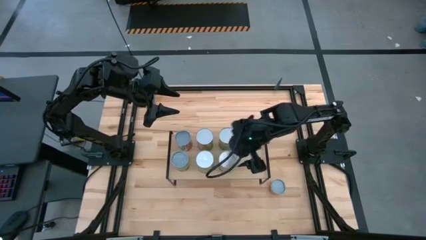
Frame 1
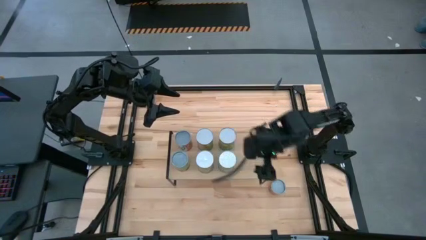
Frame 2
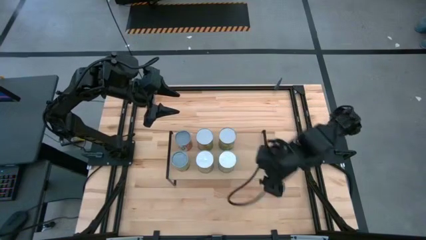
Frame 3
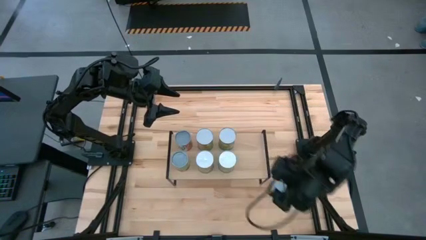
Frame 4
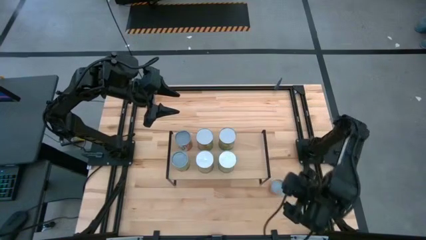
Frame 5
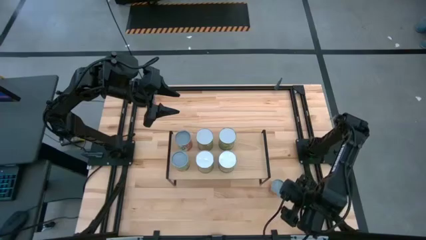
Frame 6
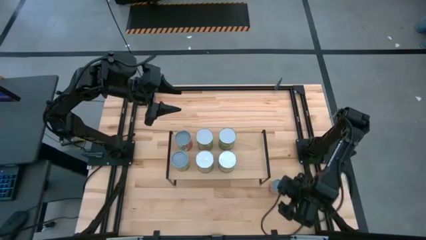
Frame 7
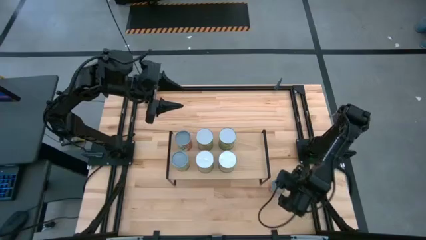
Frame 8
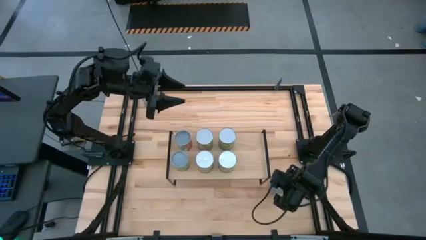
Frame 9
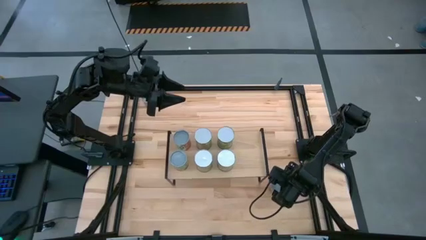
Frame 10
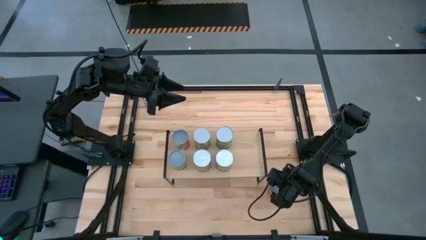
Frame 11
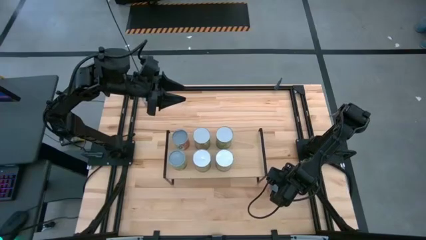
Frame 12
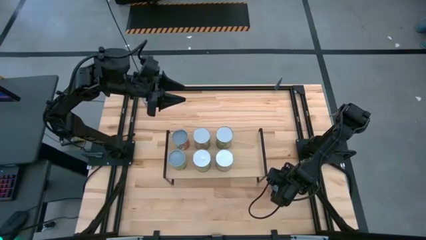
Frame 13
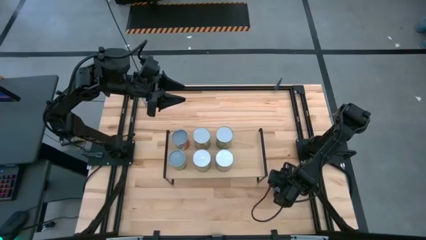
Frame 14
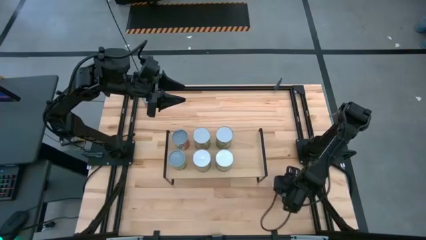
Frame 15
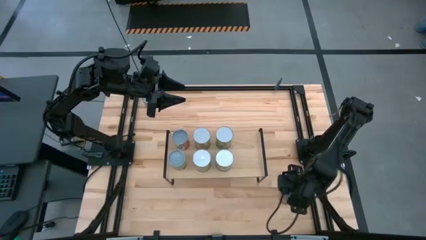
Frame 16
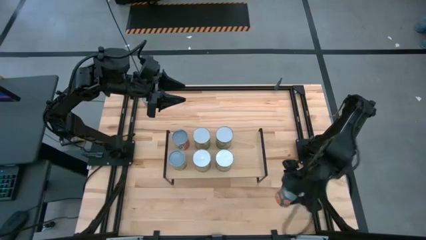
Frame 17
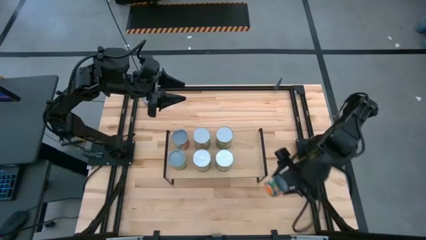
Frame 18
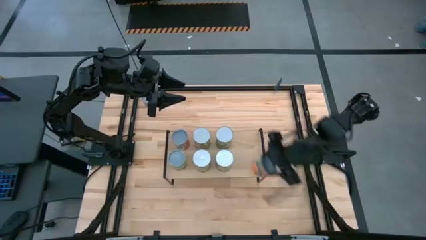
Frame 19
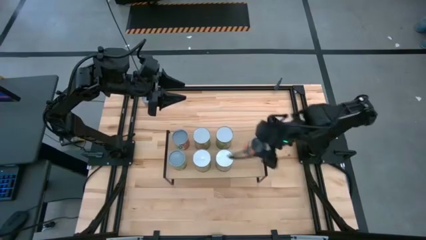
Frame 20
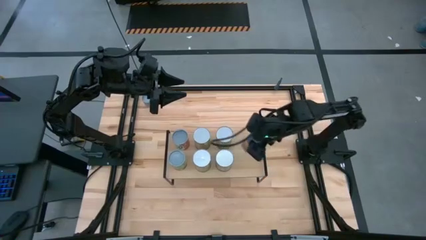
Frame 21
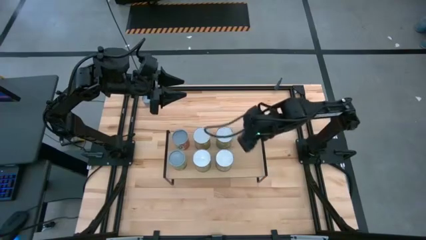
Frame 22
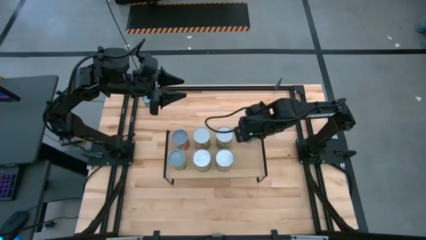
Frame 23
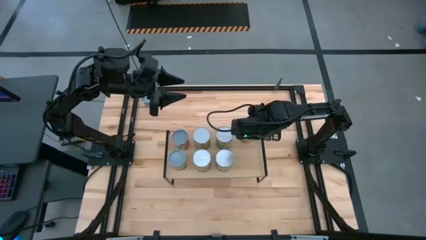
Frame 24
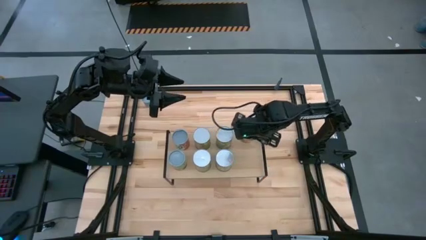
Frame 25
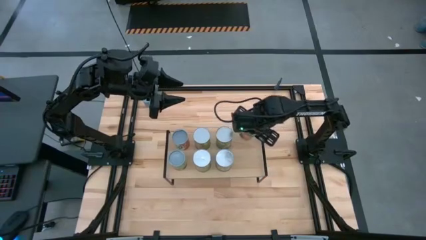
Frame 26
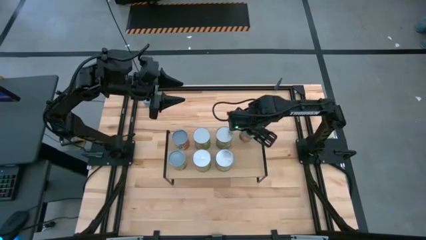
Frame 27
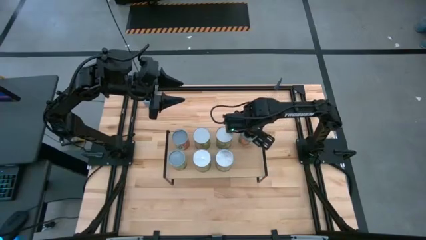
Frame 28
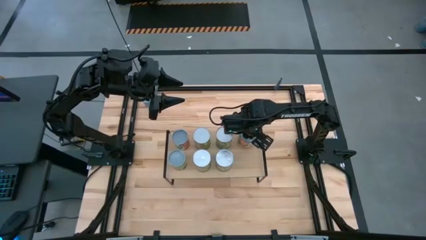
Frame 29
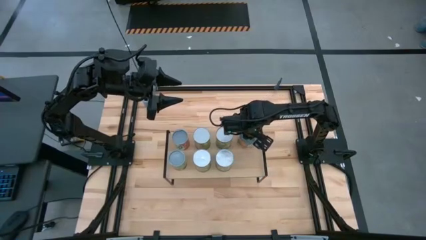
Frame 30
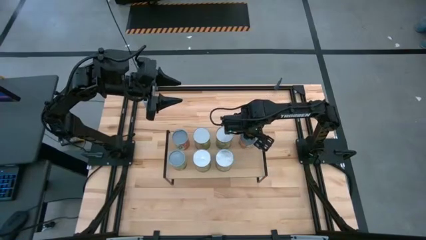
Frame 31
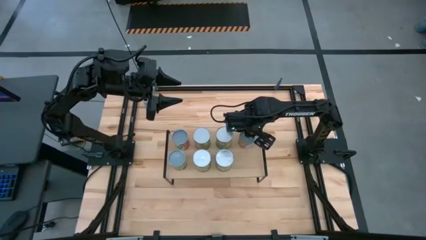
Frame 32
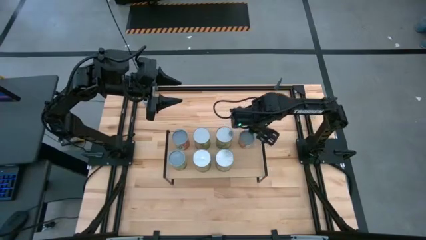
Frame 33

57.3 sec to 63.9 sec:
Task: Pick and place cans onto a shelf
Put the small canned oranges on the shelf

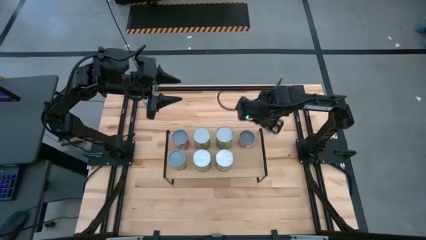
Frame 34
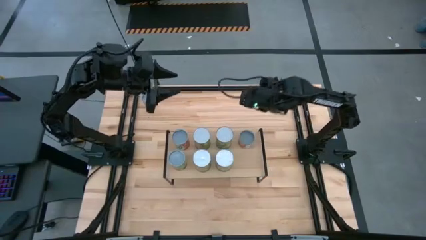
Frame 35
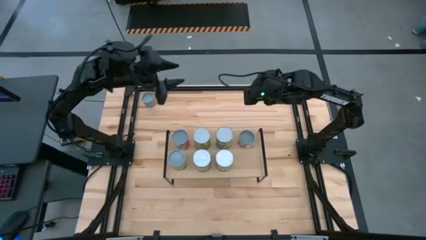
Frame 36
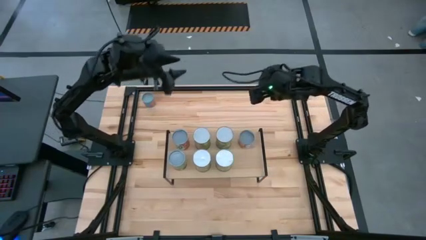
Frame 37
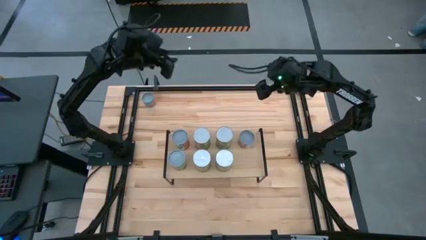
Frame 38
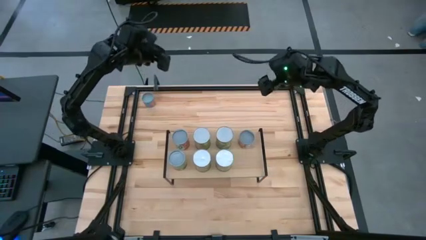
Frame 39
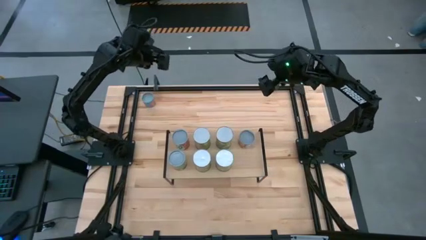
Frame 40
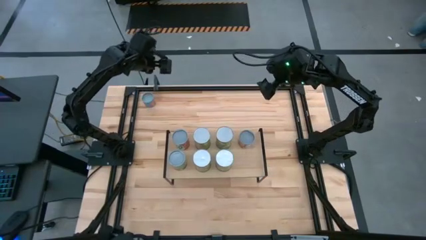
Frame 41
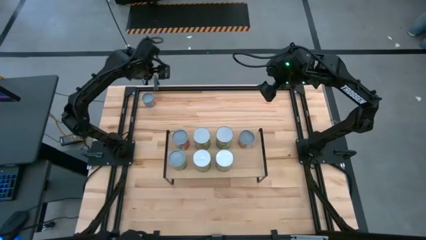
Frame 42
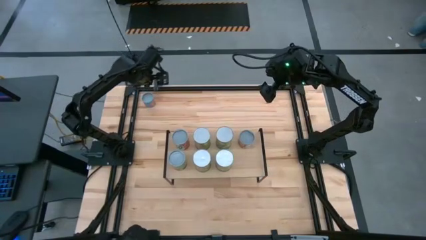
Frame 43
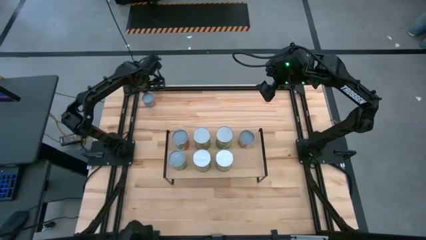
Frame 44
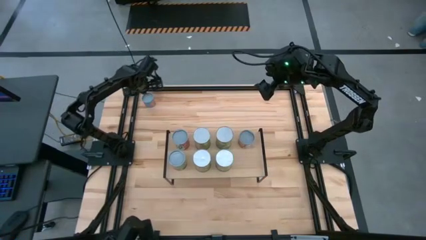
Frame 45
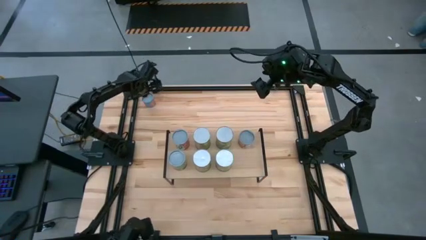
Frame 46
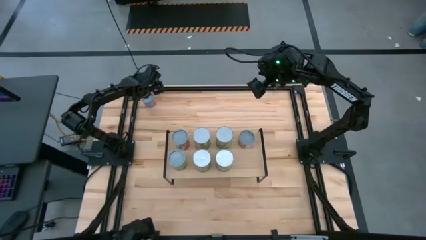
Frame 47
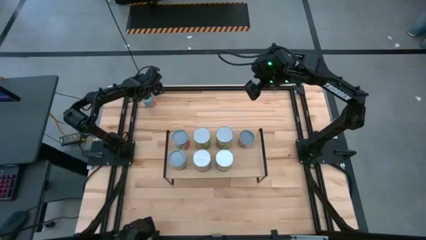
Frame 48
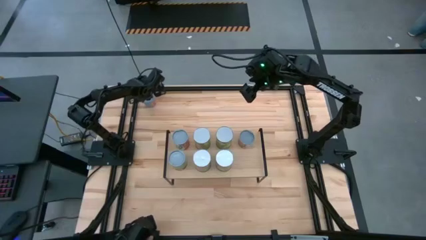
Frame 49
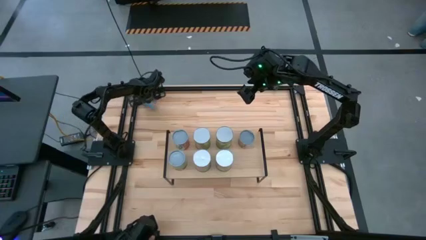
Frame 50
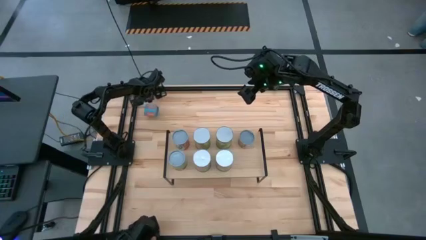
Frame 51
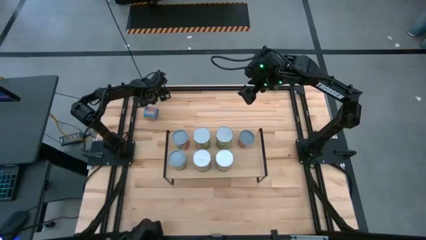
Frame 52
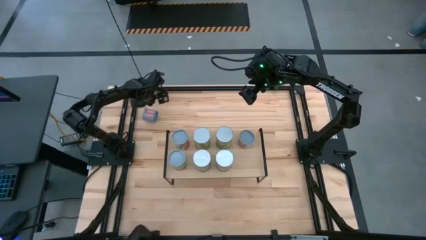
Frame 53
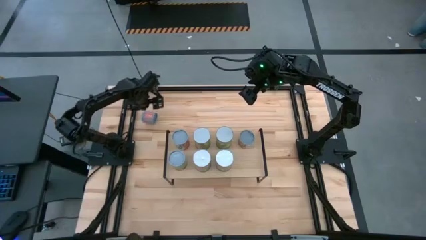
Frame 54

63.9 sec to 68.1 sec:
Put the canned corn on the shelf aligned with the small canned oranges

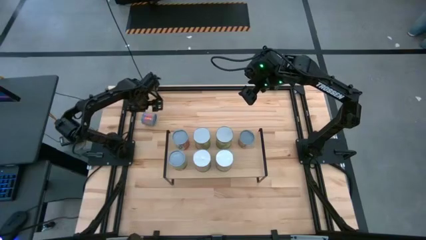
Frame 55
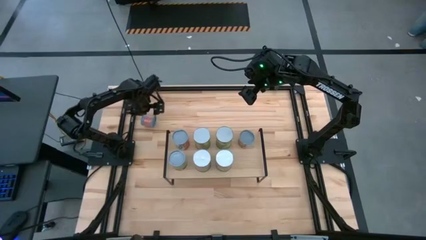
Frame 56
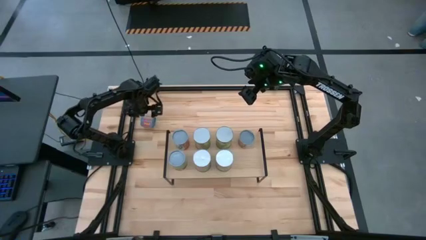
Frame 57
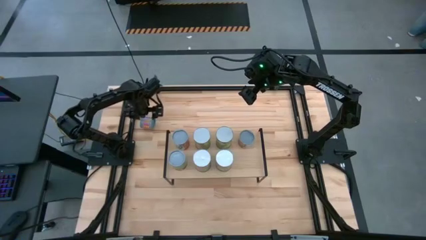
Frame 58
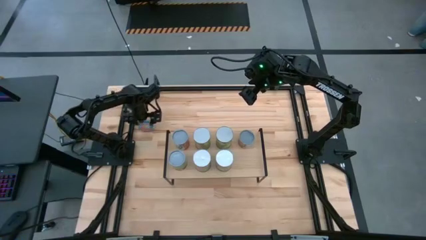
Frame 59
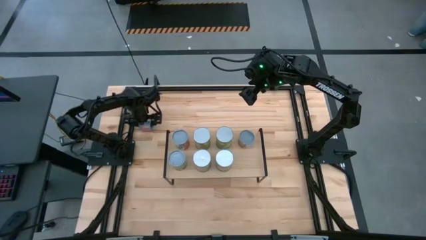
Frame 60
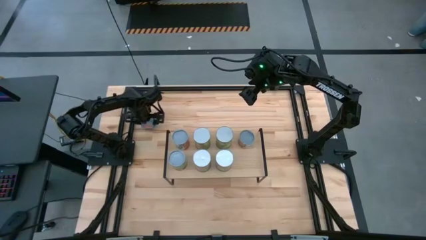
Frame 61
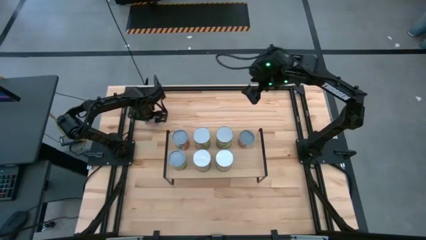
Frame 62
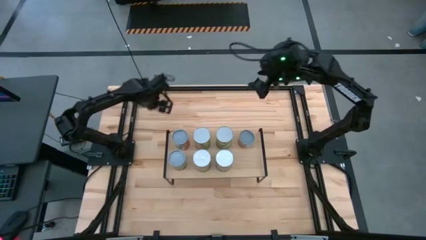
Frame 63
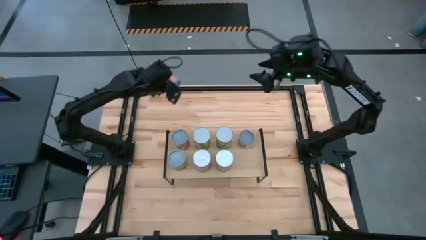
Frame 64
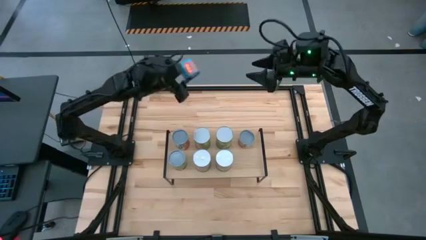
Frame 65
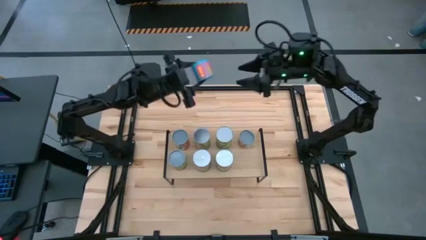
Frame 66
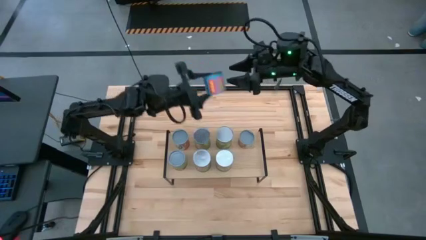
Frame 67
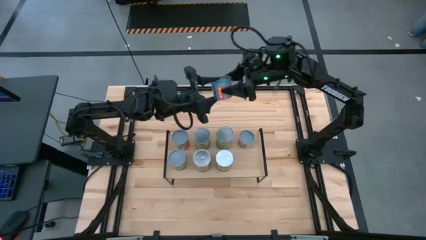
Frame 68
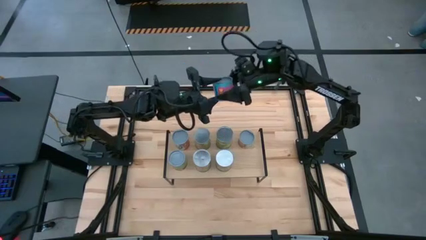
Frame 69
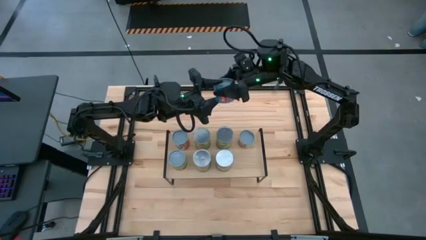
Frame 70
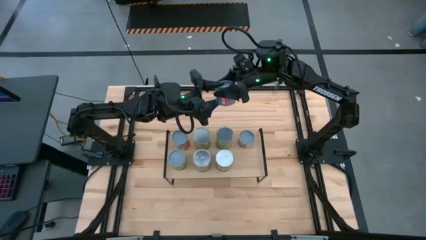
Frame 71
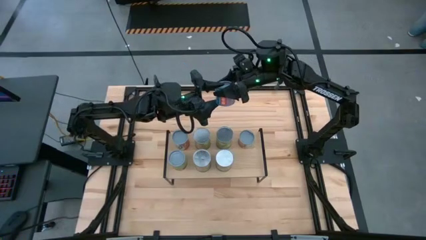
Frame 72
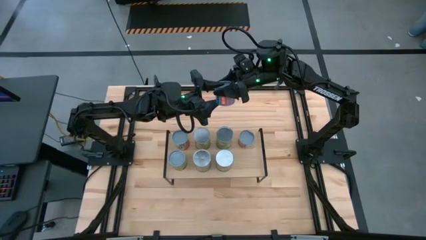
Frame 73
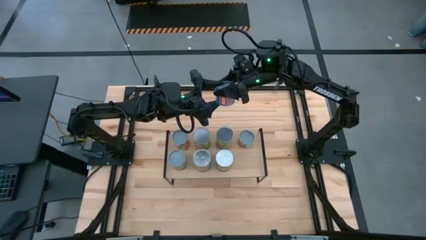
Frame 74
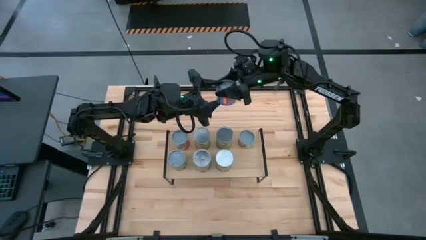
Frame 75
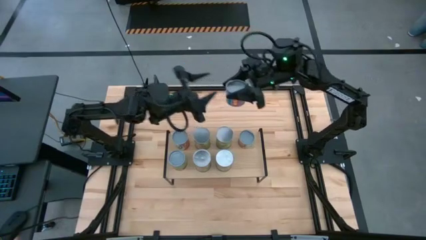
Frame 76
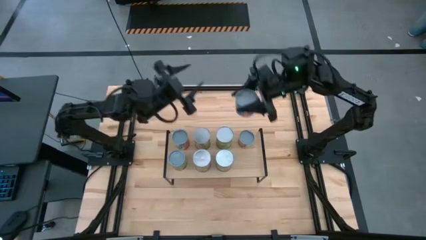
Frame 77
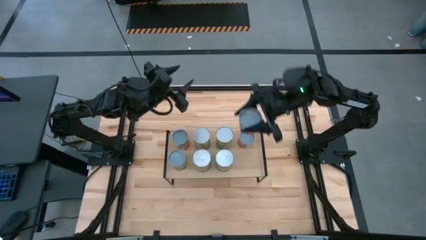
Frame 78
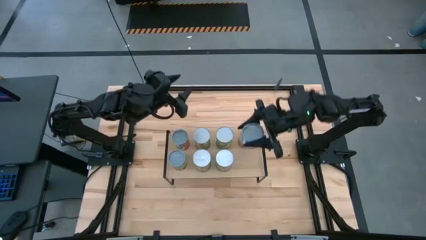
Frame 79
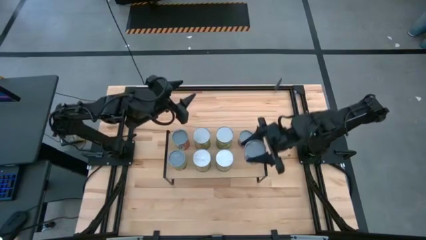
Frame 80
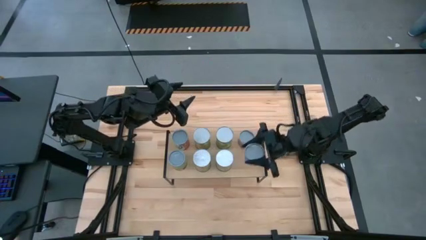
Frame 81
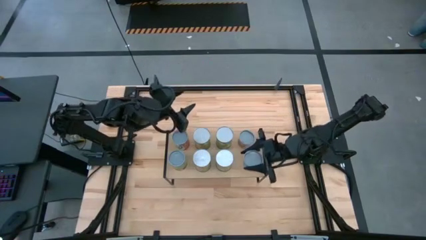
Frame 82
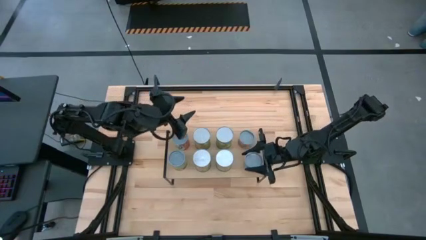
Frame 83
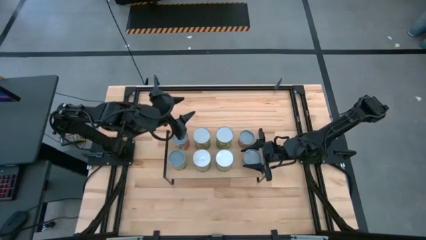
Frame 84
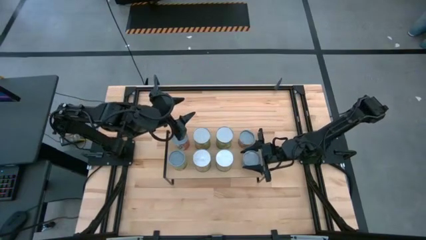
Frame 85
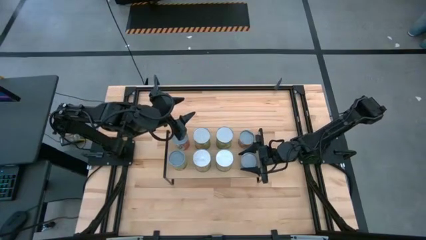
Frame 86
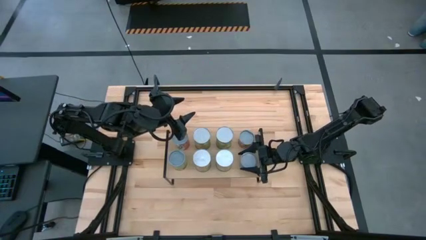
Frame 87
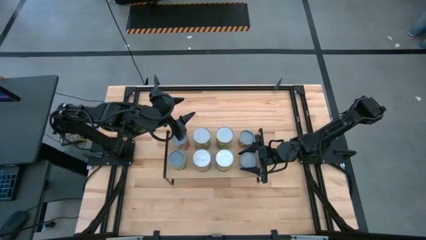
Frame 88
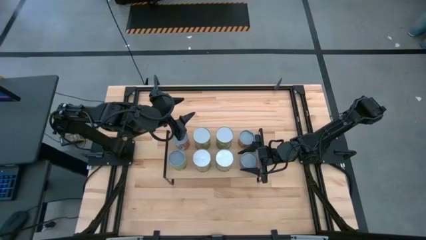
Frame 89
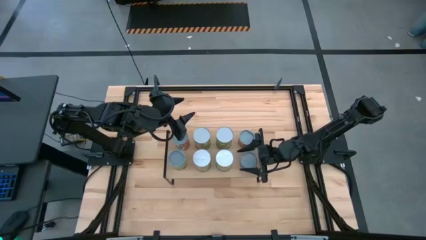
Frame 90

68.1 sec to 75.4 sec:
Put the canned corn on the shelf aligned with the small canned oranges
